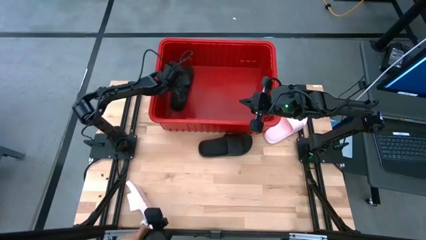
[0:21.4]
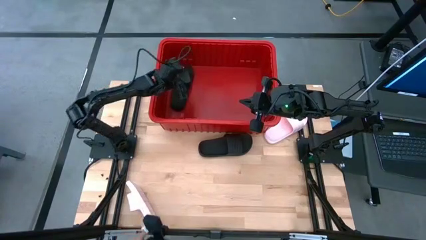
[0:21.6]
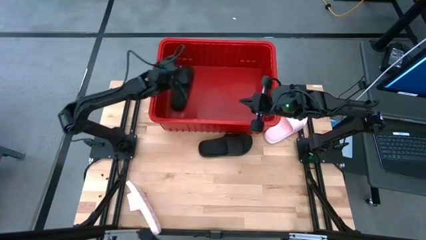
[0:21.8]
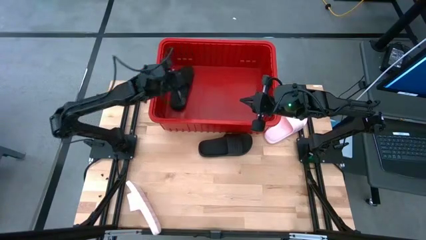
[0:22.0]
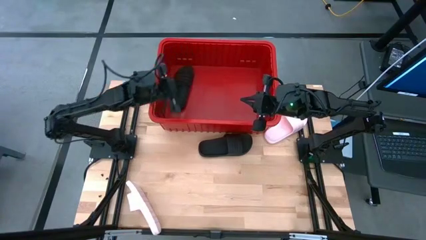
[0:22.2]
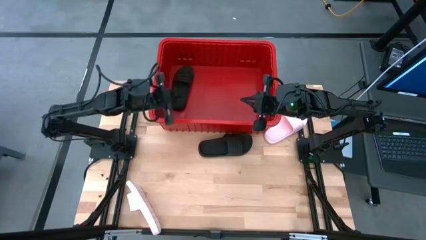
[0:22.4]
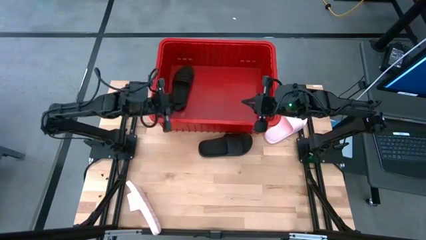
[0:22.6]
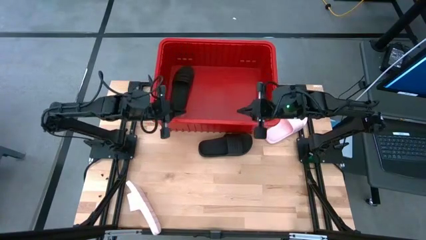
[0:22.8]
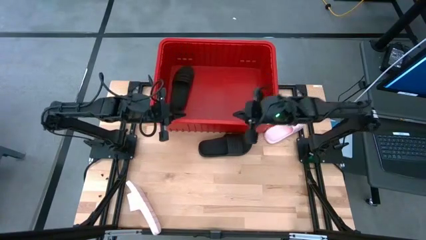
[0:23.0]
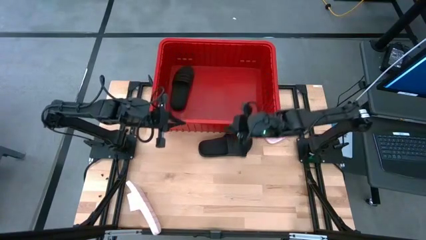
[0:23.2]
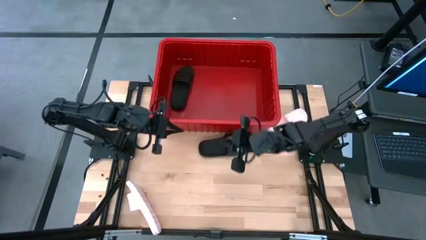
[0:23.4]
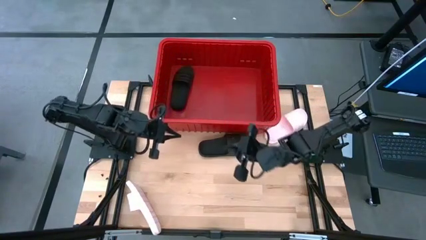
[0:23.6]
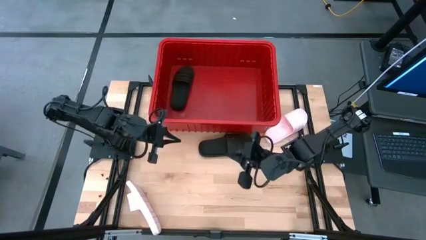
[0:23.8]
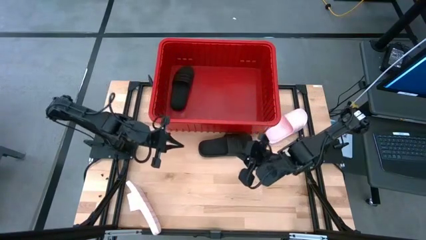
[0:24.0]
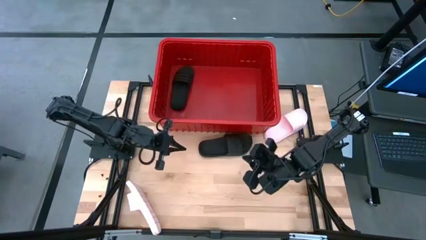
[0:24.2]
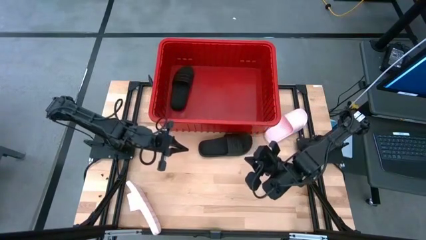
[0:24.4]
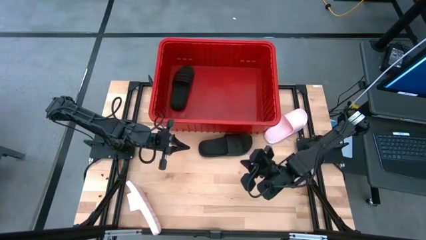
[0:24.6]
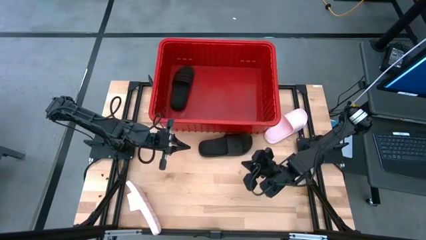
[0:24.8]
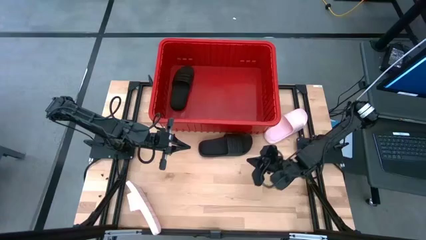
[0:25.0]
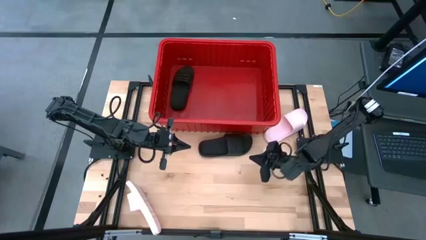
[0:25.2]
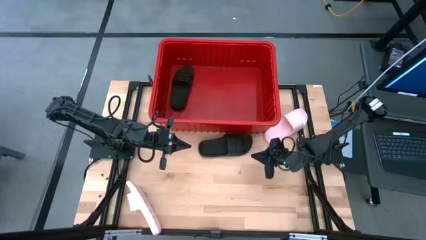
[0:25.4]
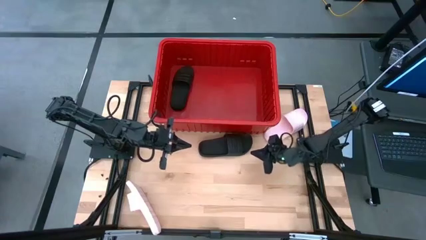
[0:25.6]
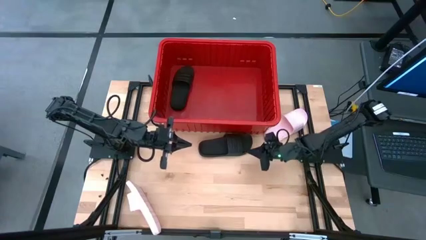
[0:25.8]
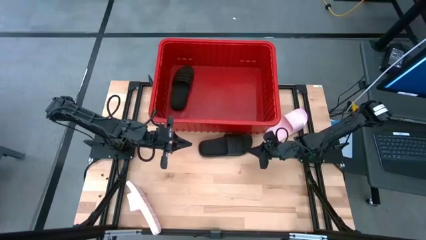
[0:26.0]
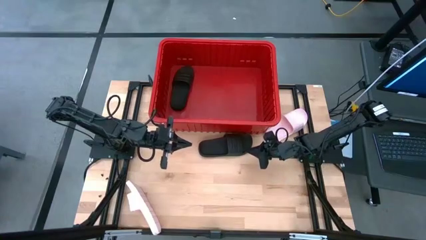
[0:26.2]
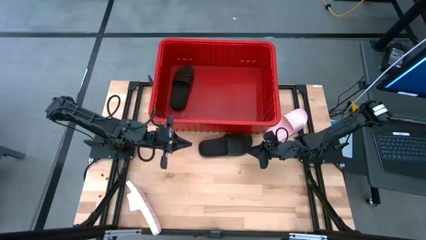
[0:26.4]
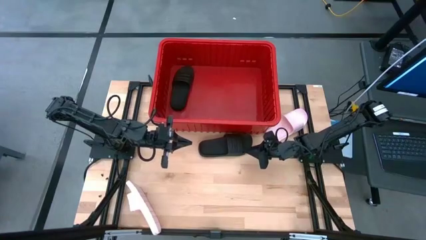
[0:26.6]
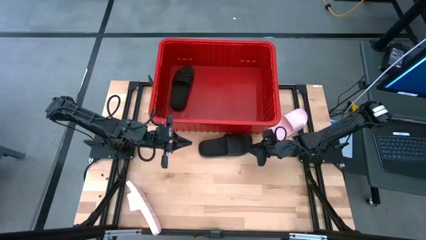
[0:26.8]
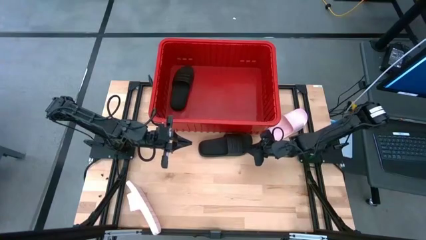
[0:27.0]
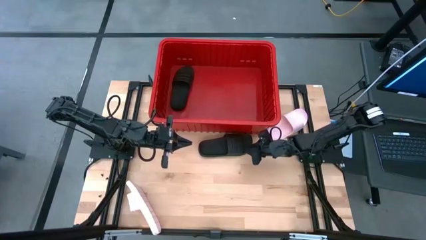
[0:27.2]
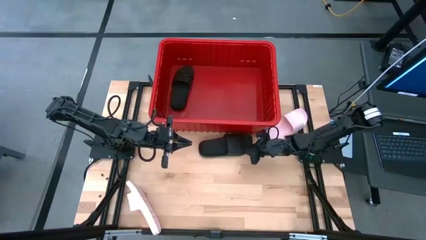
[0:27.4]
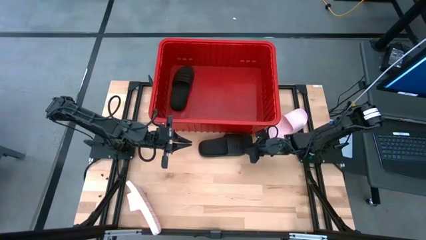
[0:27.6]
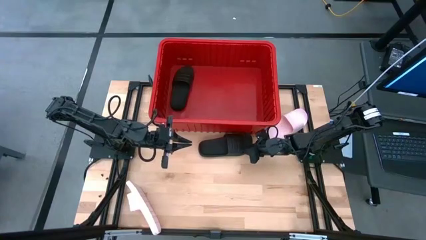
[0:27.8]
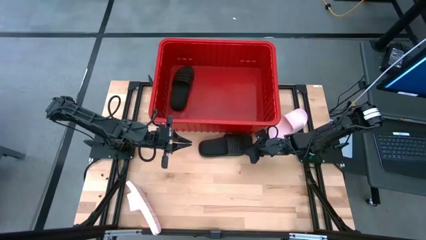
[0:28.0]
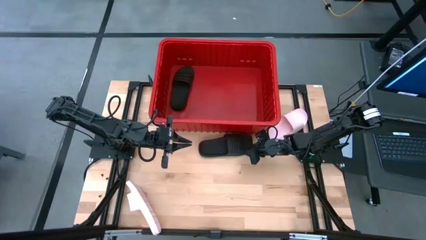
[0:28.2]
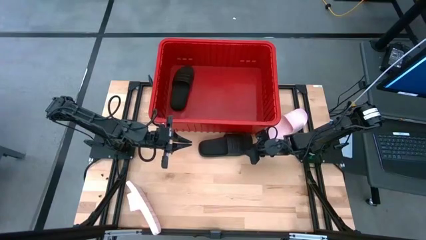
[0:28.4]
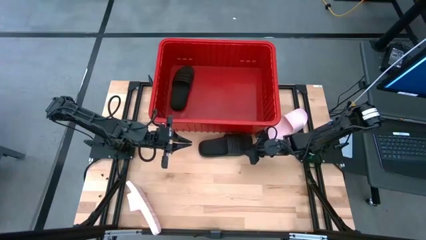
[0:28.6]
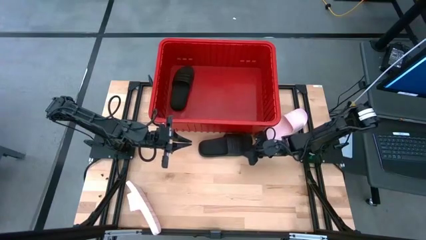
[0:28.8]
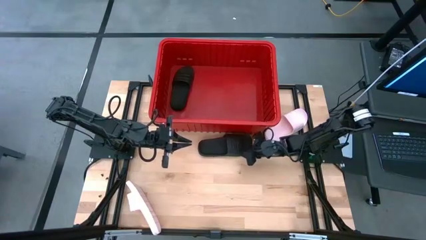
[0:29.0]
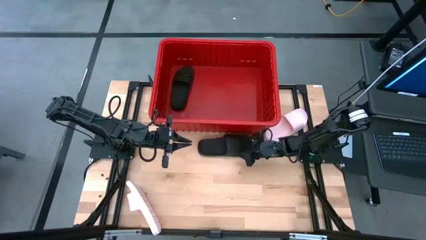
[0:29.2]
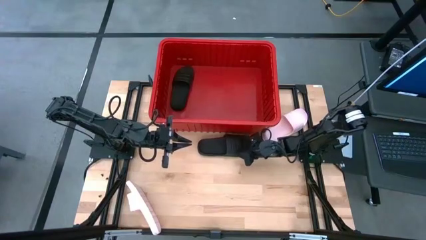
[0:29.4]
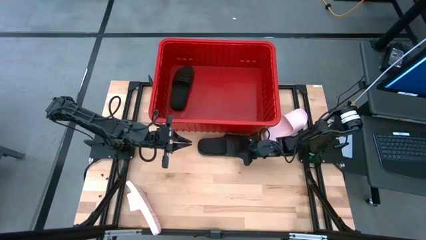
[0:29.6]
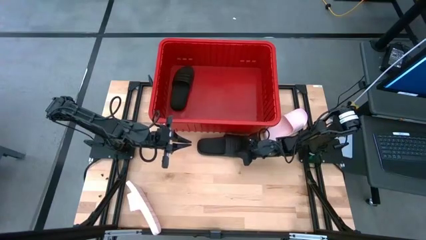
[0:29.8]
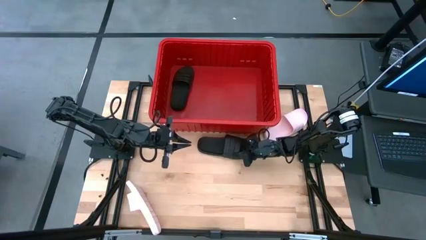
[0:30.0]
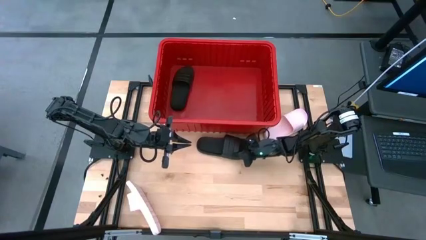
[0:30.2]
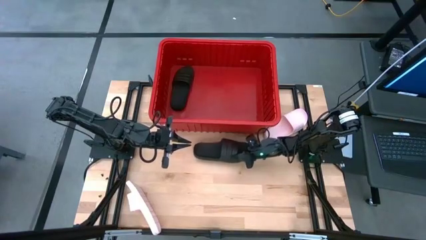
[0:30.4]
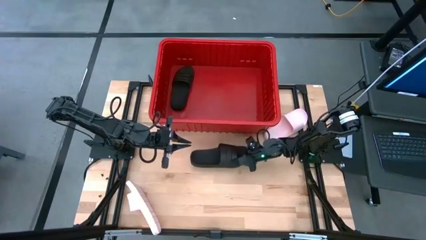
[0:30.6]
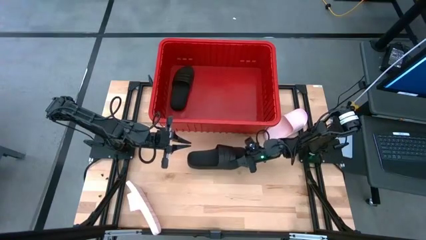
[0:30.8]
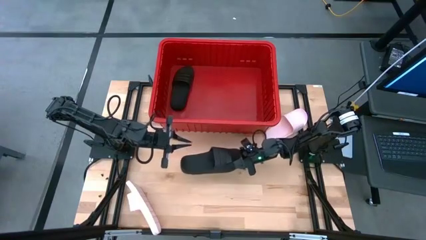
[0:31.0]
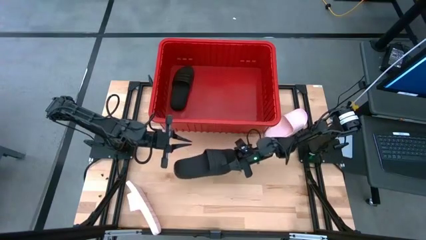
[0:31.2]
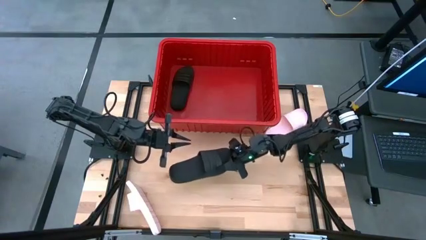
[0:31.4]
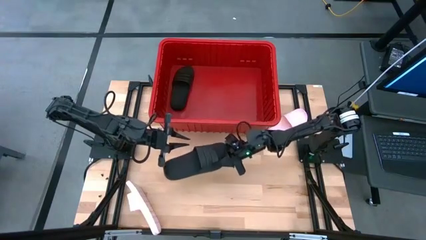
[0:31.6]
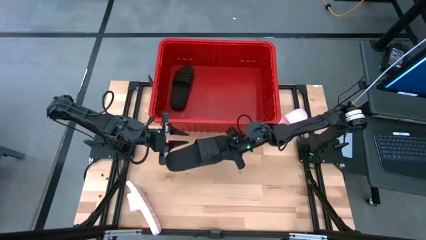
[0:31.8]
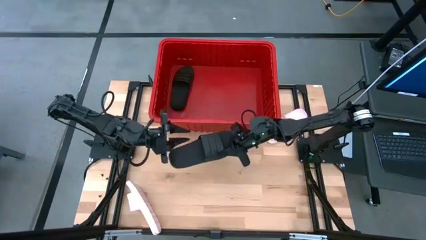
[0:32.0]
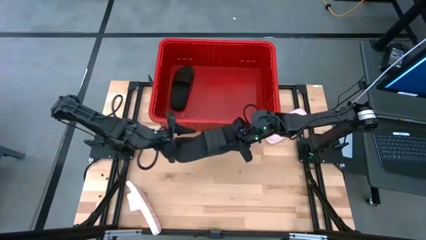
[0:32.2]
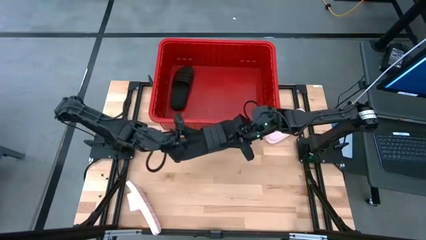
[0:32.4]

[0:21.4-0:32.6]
Task: Pick and place slides into bin
Put the black slide into the red bin
